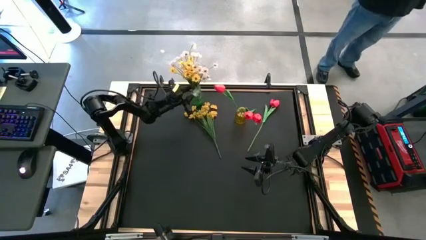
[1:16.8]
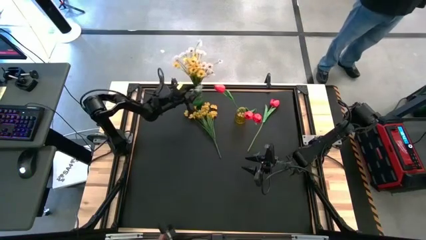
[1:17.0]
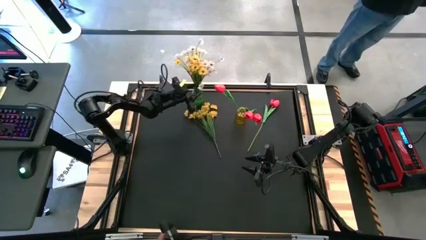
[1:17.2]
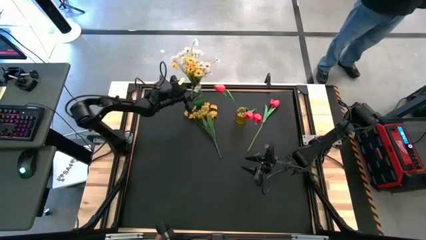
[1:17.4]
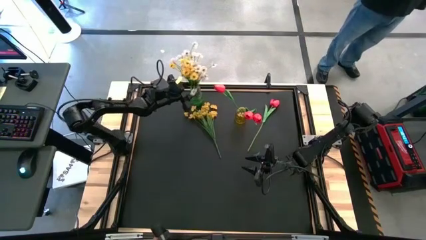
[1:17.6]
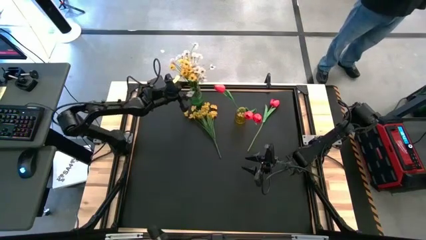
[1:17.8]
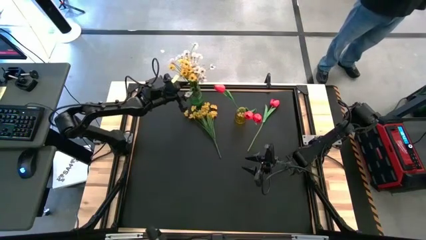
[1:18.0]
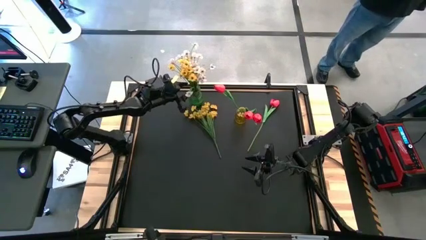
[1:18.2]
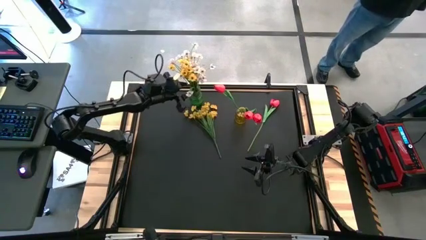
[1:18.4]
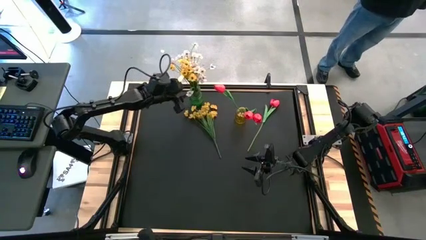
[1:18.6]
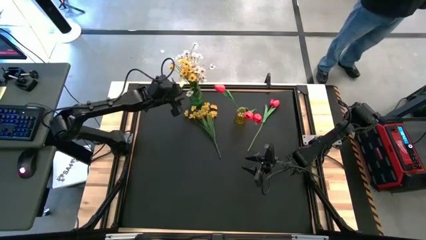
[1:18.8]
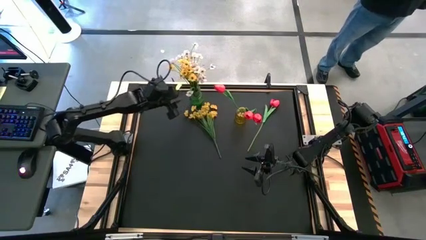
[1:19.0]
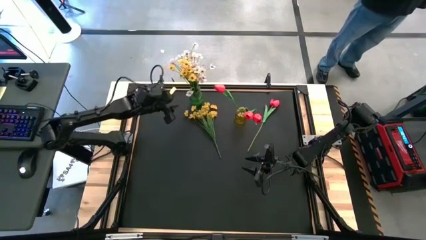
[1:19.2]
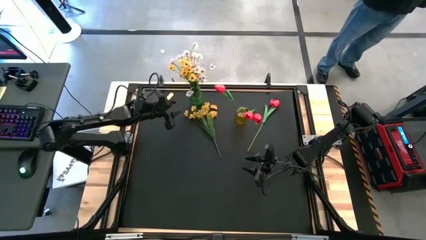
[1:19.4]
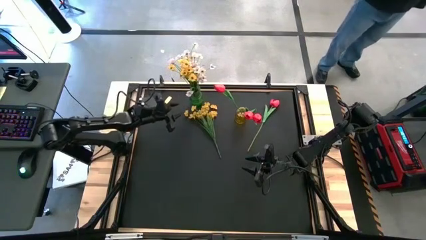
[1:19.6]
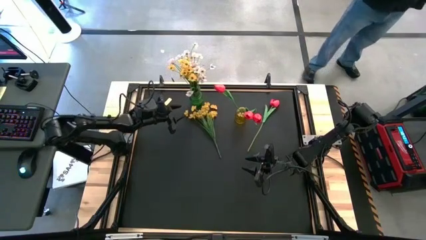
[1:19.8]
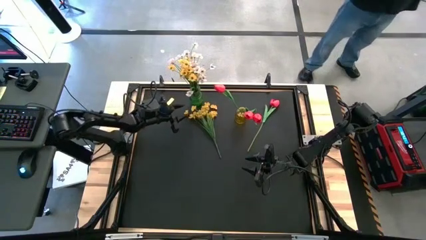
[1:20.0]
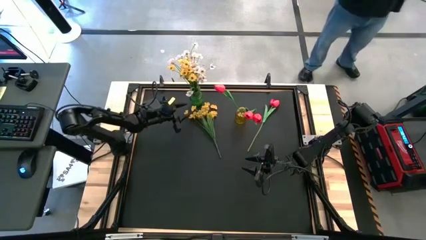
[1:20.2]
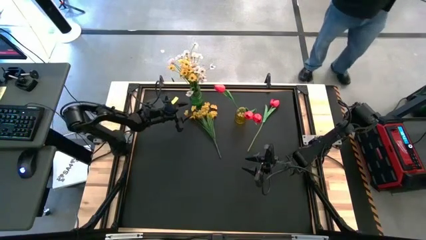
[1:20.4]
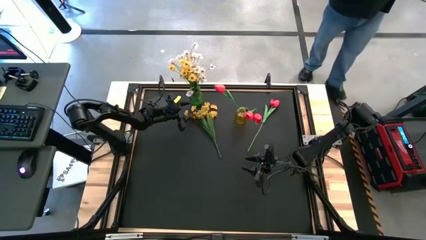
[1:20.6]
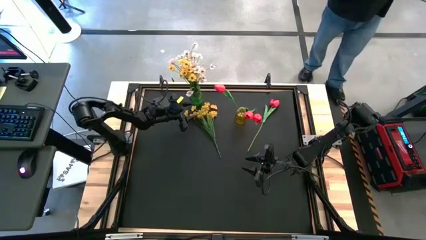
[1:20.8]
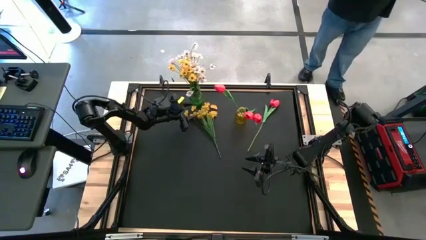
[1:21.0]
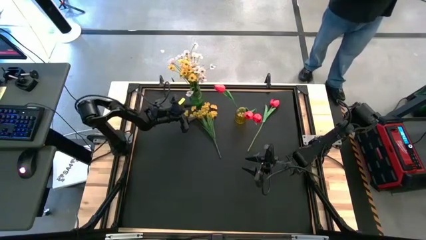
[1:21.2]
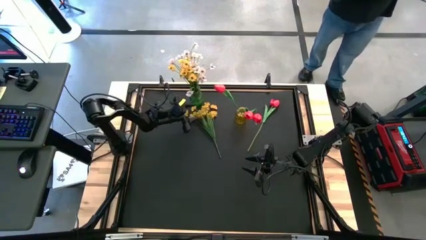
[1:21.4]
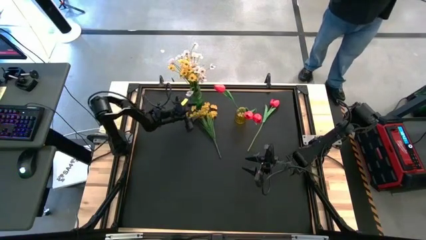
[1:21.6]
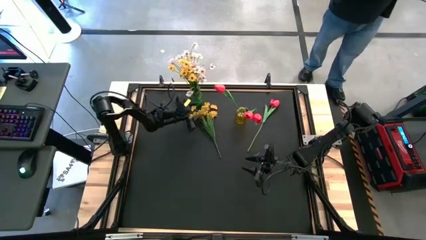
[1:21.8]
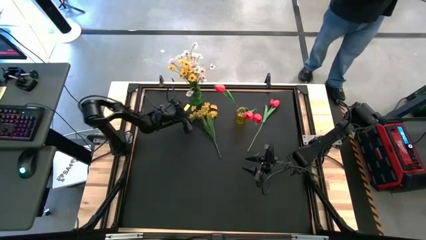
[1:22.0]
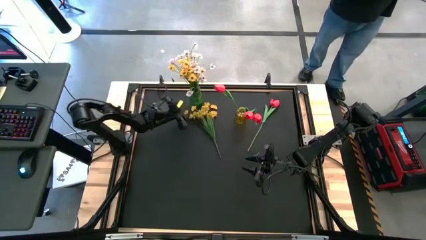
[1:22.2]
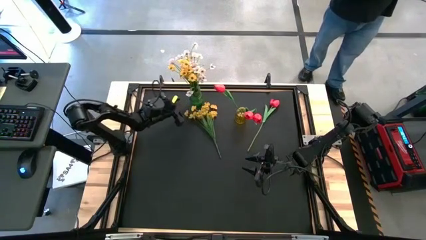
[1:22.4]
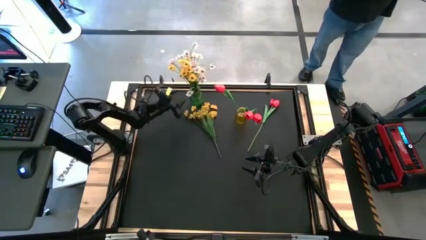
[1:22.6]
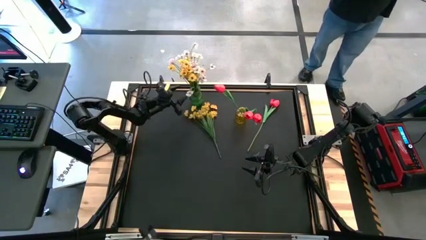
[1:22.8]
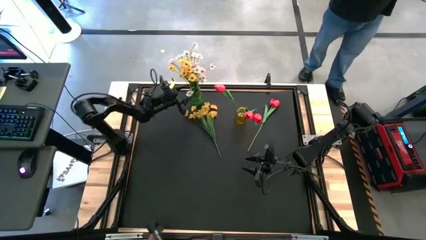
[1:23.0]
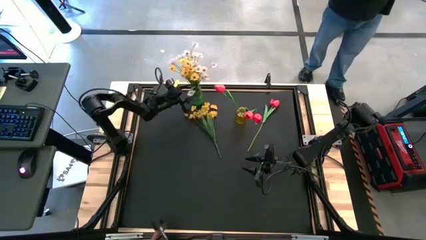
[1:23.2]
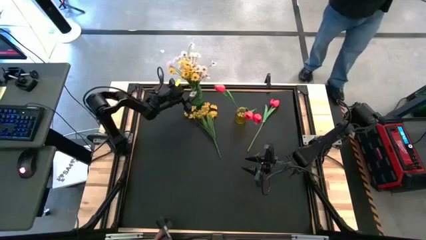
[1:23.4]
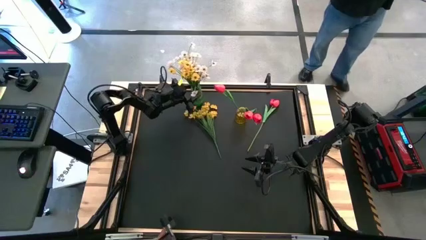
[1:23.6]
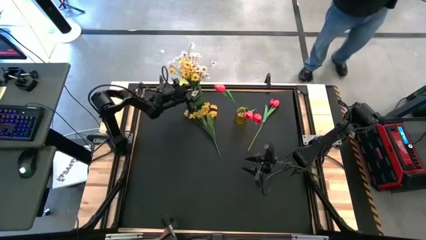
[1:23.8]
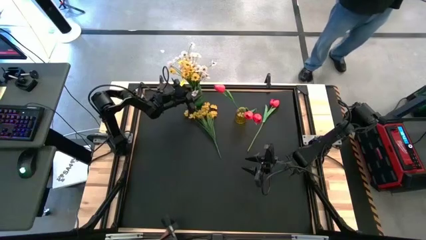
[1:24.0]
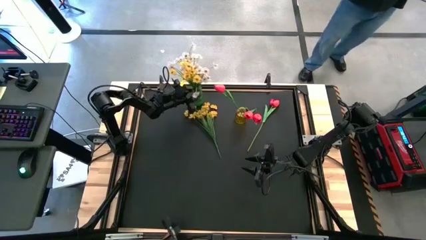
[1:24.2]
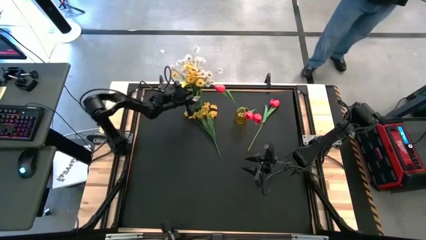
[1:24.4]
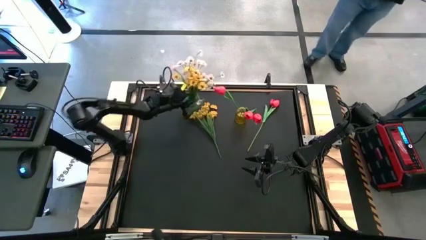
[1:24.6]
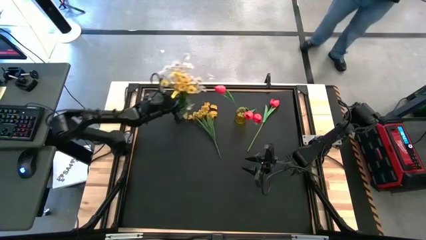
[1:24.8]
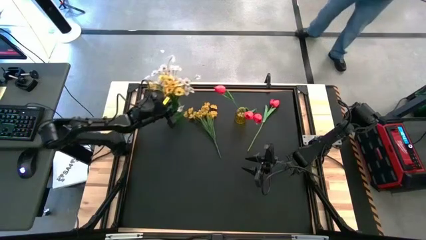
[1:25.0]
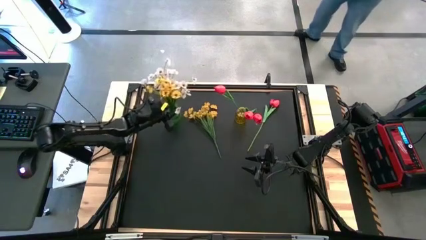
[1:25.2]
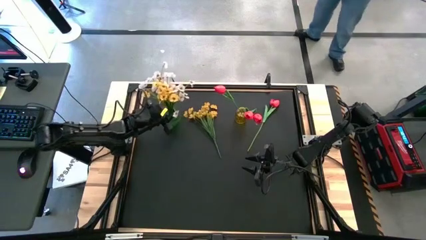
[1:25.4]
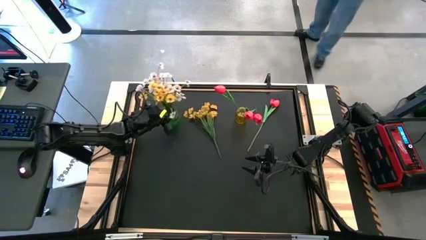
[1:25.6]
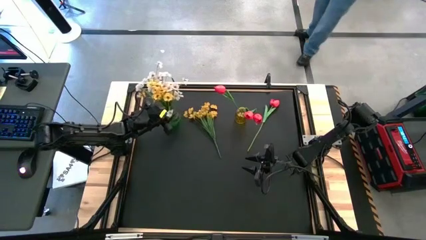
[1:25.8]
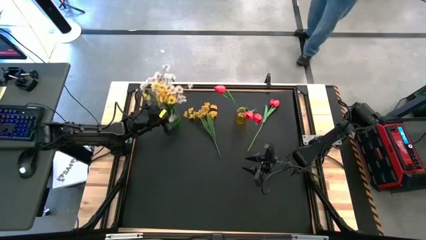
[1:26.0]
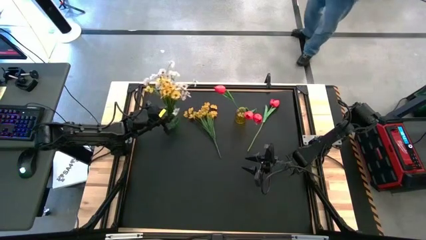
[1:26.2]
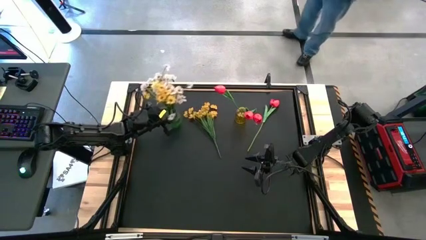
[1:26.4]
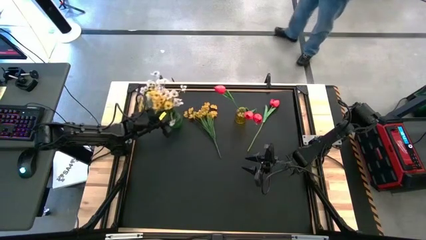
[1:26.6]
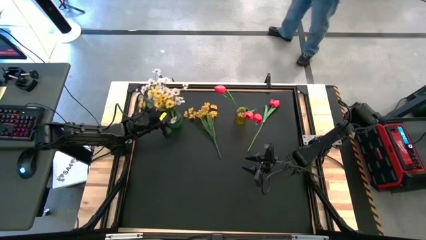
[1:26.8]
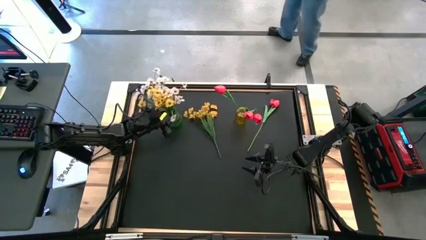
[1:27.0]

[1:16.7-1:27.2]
Task: Sort flowers into vase by color
Move the green vase to the left

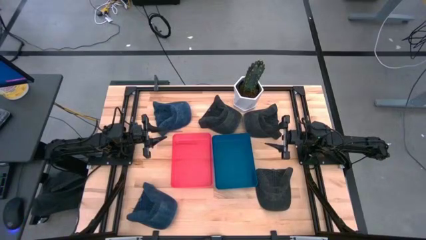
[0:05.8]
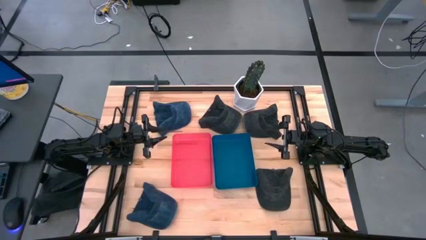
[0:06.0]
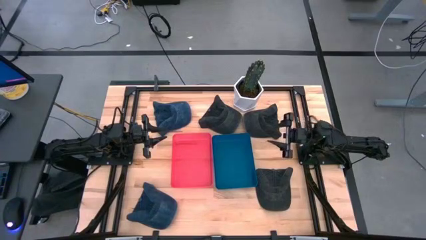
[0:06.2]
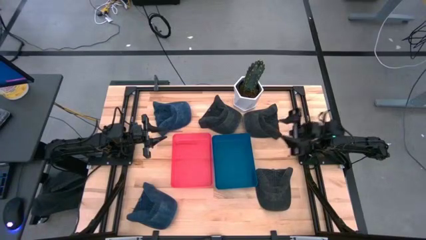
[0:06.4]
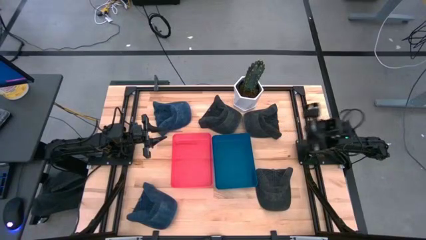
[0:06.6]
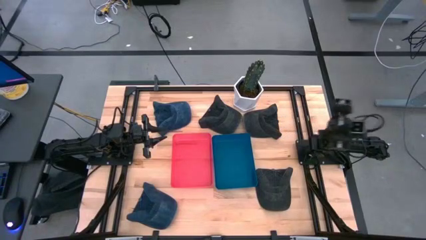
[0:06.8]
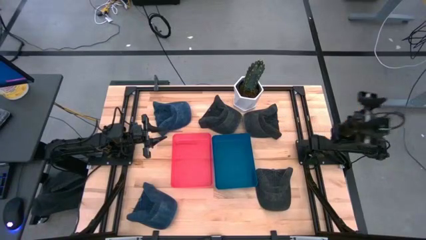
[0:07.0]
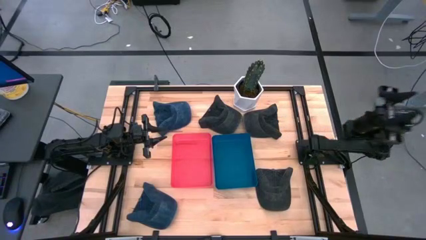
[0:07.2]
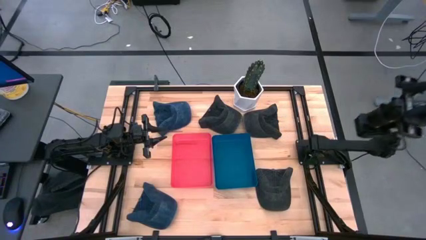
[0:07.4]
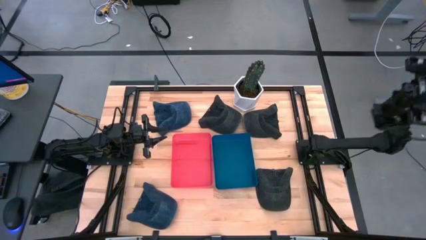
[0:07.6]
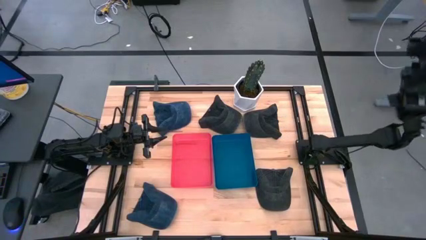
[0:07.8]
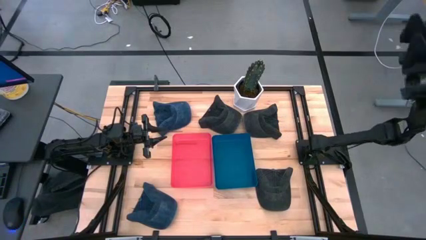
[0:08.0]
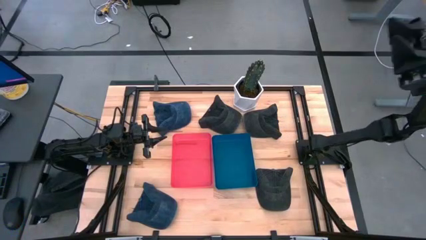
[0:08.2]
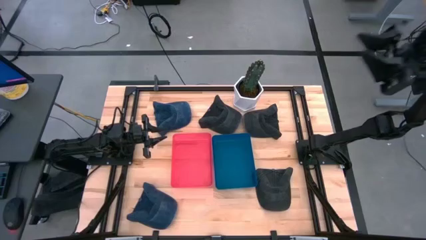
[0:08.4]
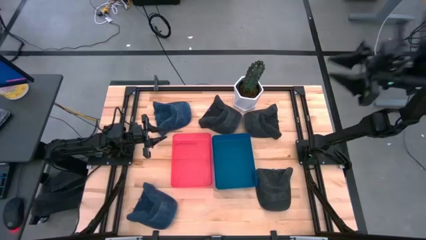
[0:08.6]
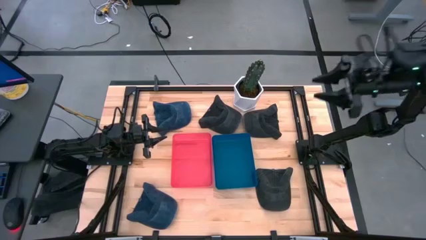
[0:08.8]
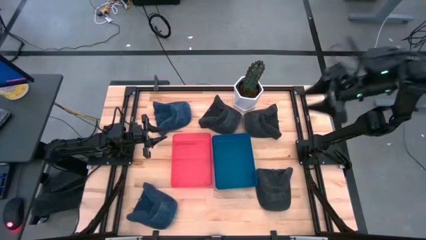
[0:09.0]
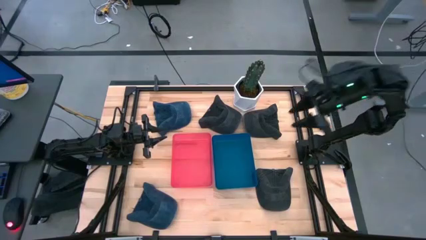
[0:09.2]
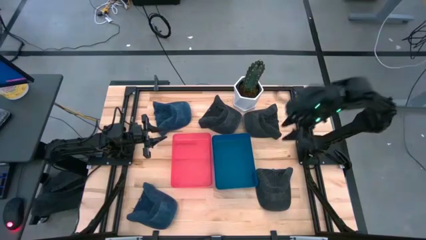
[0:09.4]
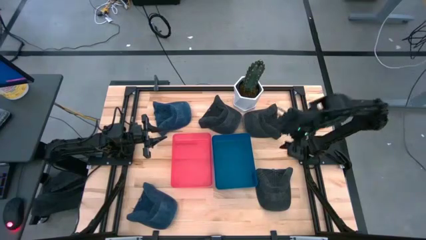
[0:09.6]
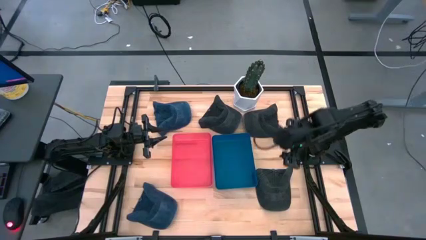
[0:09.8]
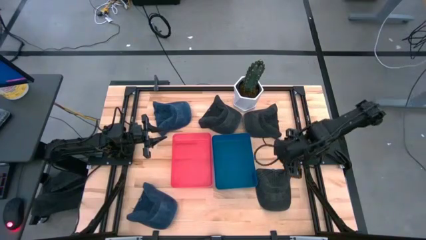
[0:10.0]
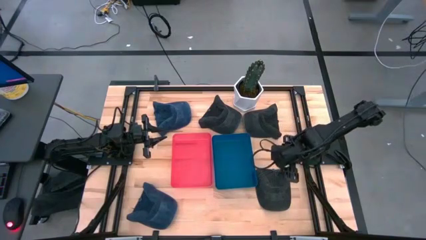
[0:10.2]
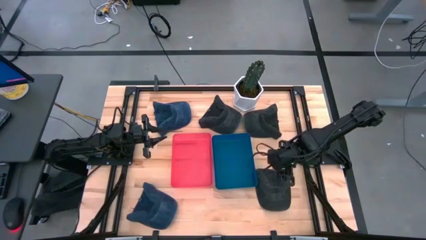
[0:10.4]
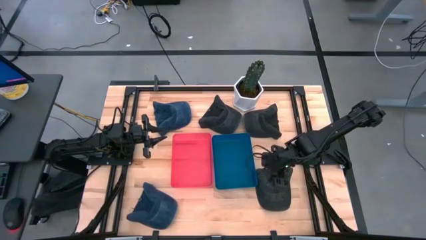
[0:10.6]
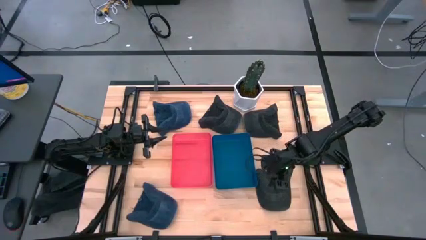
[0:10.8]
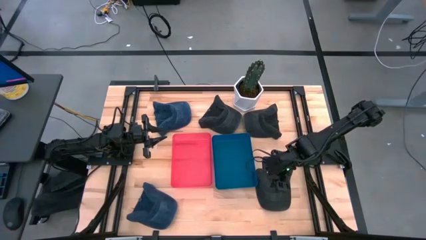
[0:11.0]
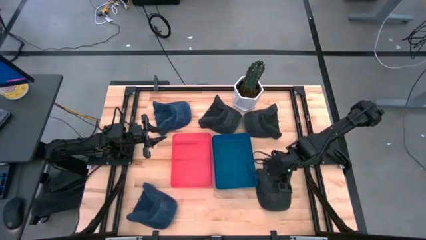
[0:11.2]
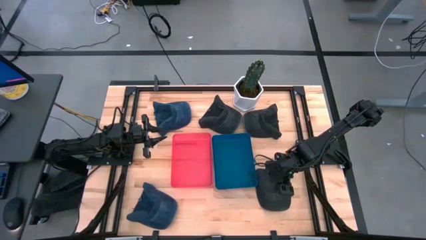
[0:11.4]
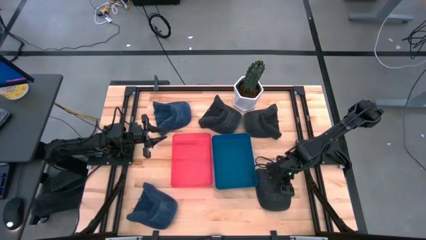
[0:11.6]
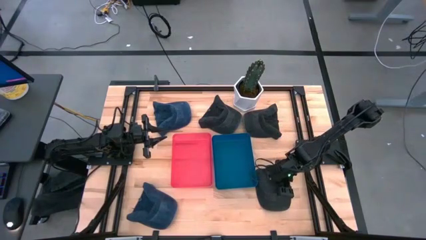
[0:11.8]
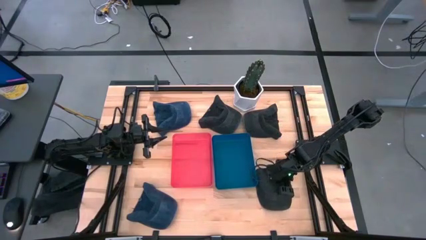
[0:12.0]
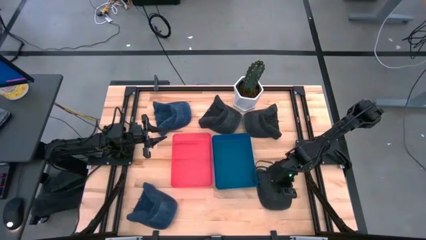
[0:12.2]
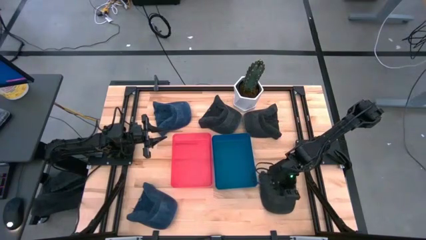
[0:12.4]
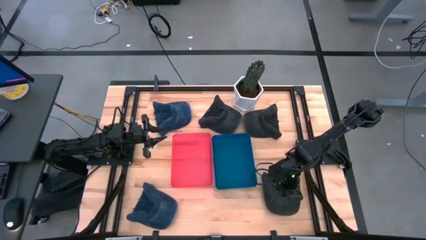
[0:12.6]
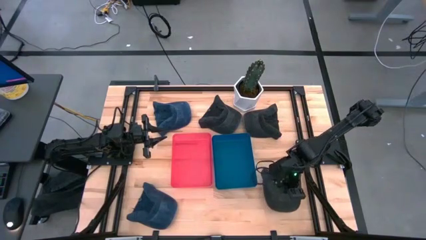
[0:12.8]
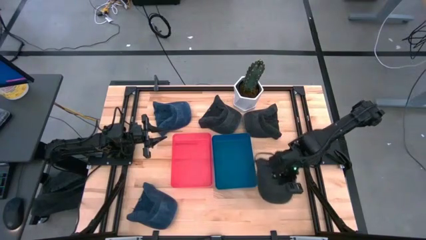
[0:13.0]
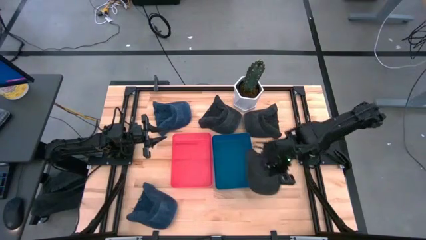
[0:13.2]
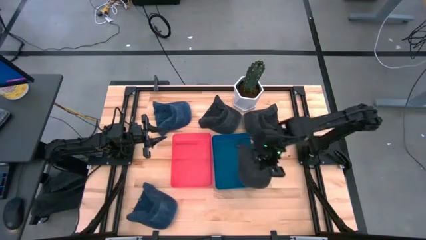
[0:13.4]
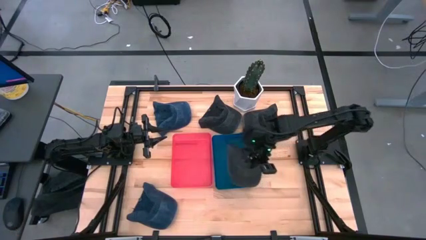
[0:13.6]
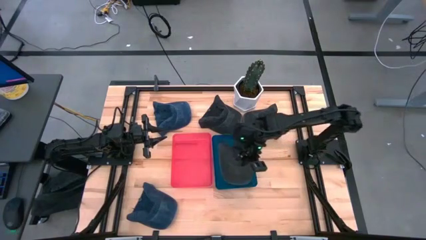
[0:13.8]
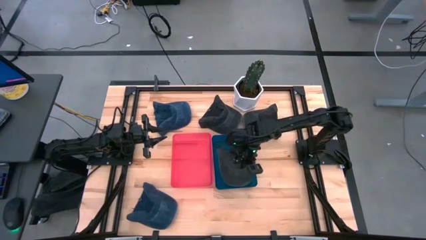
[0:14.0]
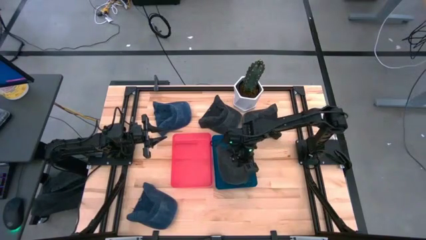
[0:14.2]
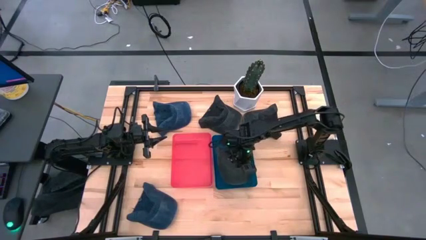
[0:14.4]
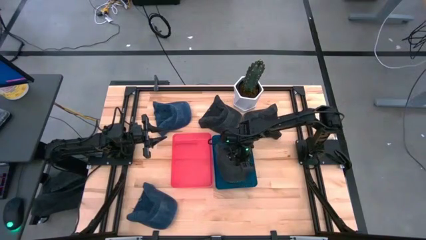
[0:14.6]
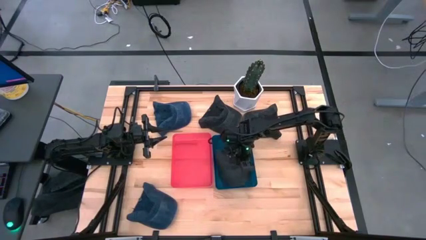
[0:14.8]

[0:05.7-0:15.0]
Task: Pick & Place hat
Put the bottom black cap into the blue bin
